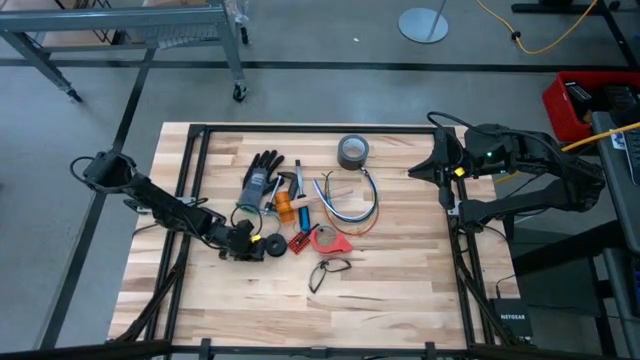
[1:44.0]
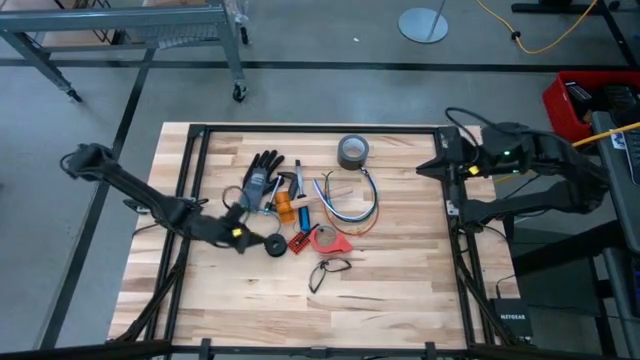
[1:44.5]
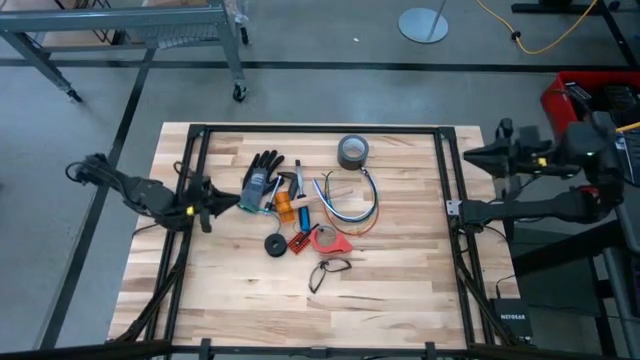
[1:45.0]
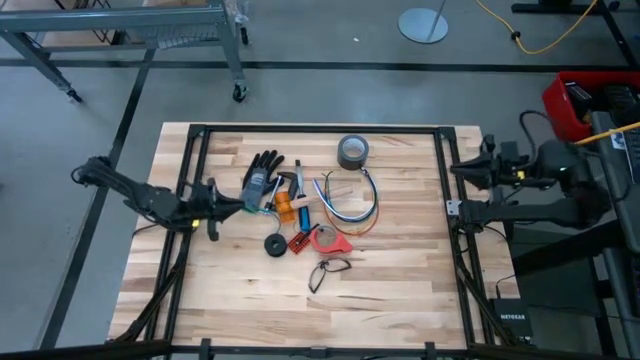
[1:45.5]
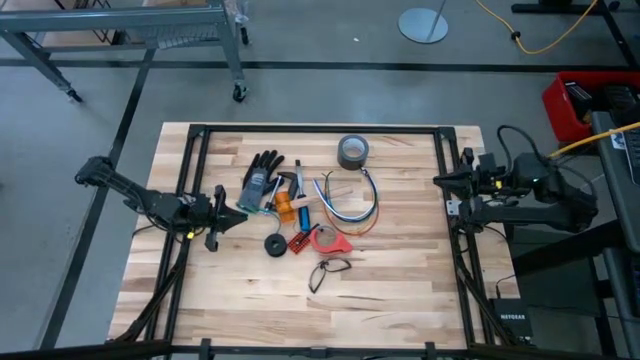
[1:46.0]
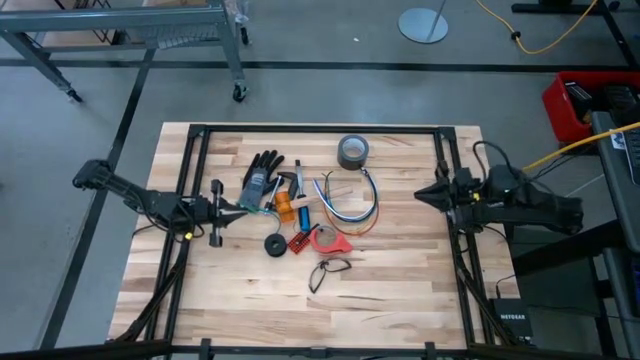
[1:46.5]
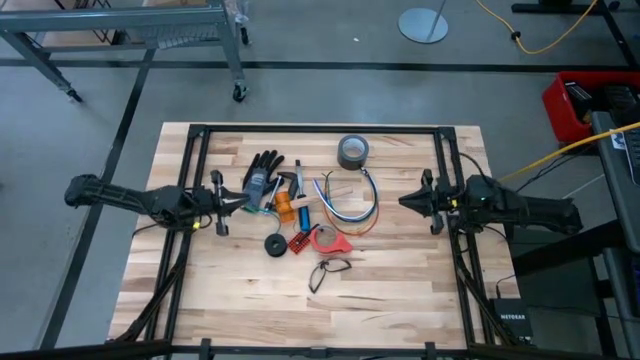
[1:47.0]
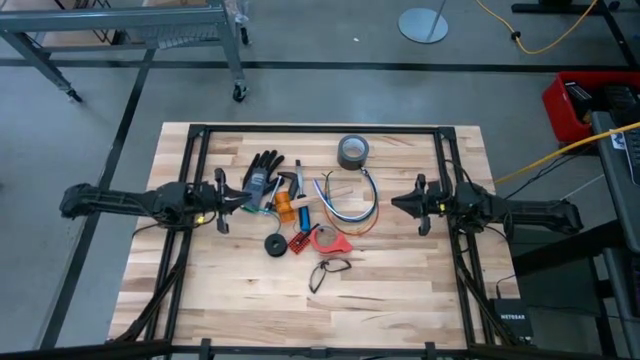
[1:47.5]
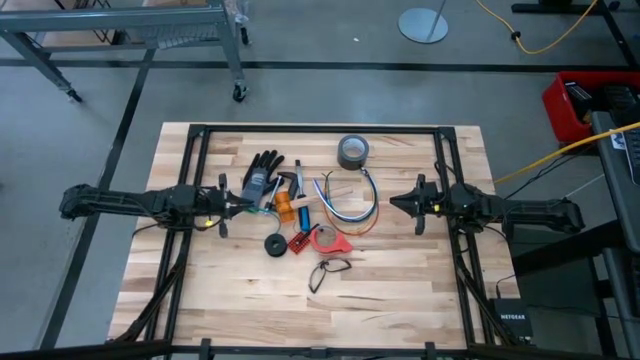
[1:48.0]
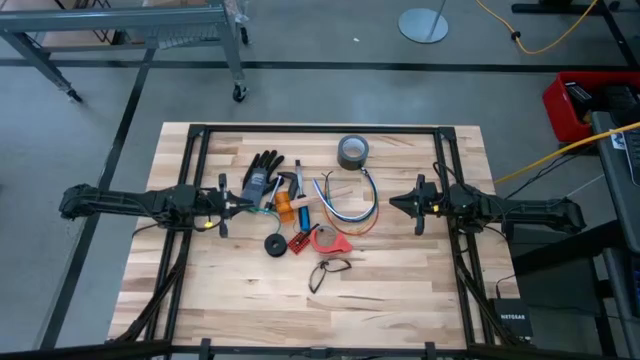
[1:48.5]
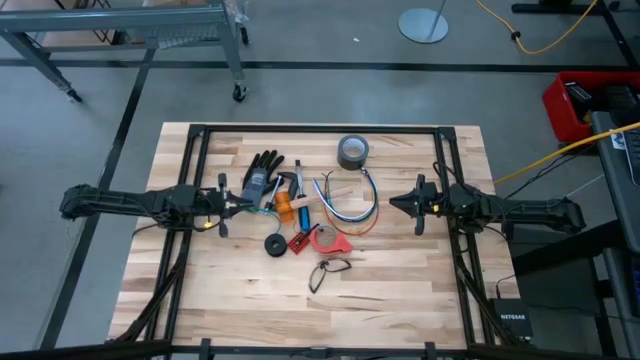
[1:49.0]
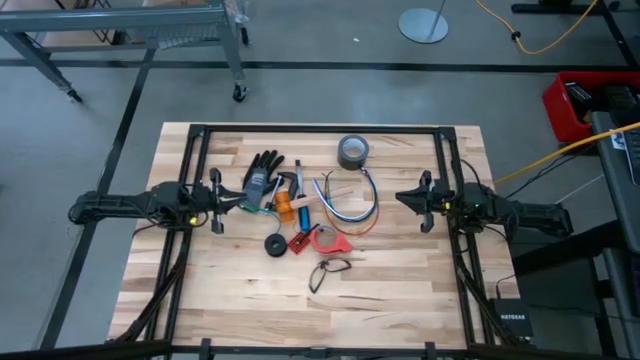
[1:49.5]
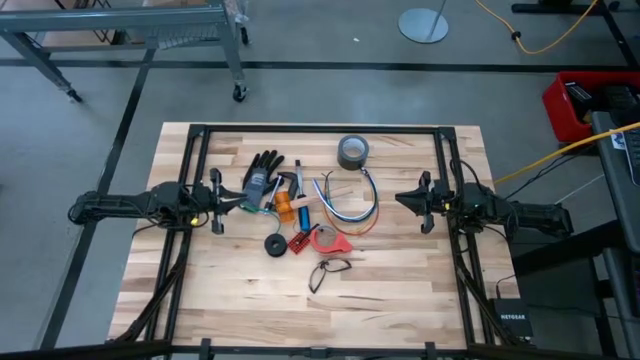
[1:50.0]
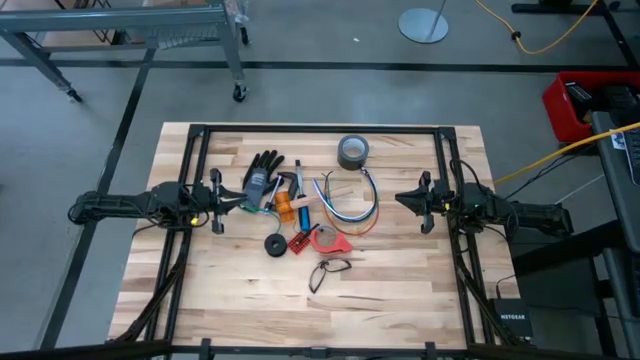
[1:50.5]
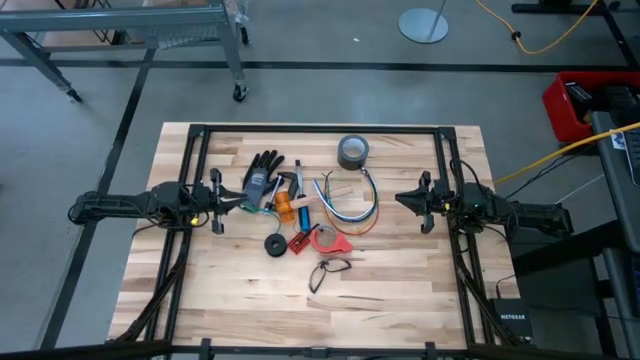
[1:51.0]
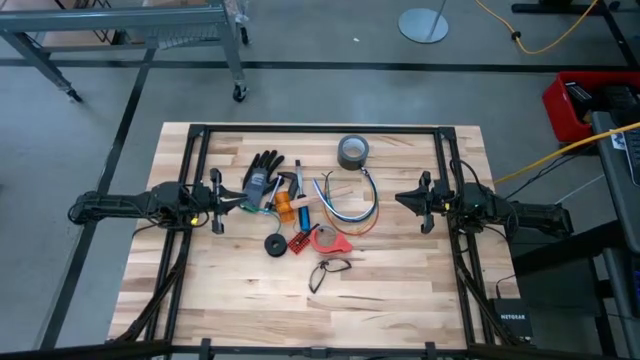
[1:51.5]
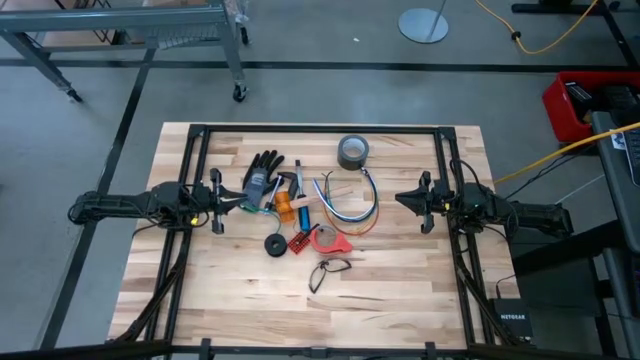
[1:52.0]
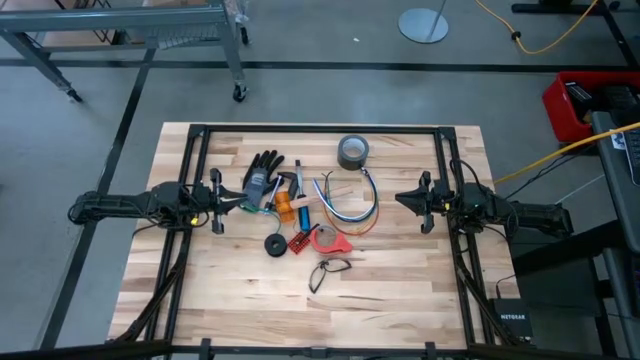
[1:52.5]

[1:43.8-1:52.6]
Task: Coil cords
Return to Home Position

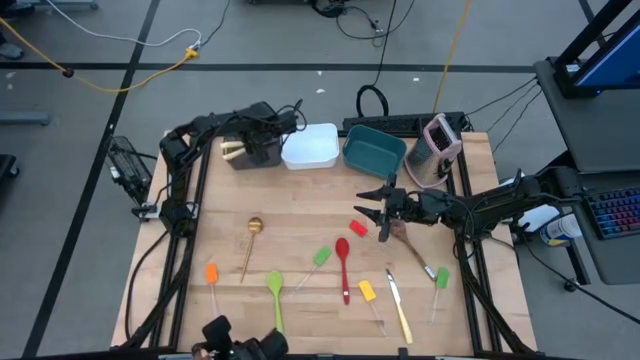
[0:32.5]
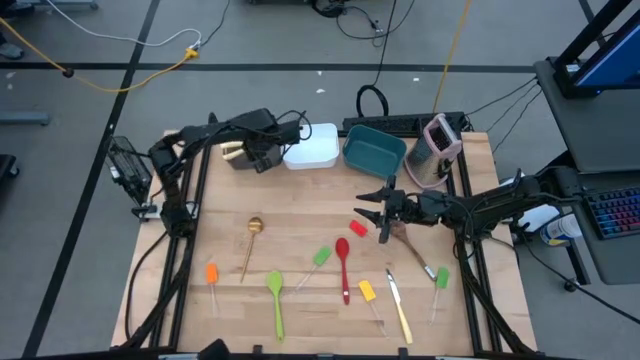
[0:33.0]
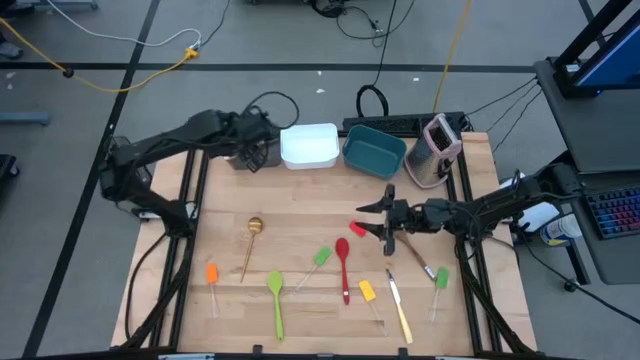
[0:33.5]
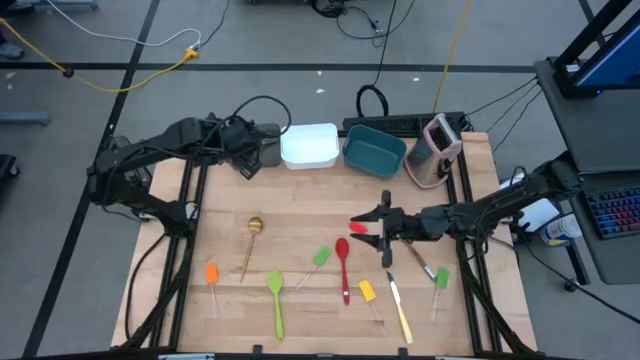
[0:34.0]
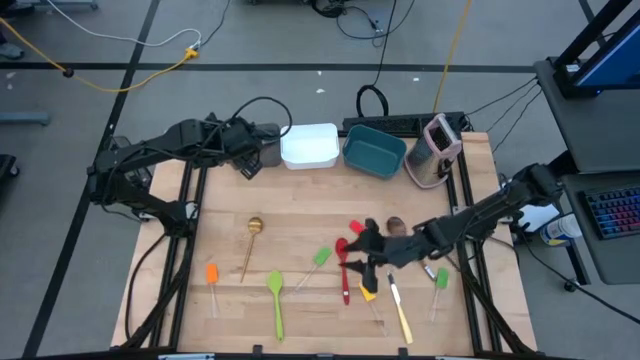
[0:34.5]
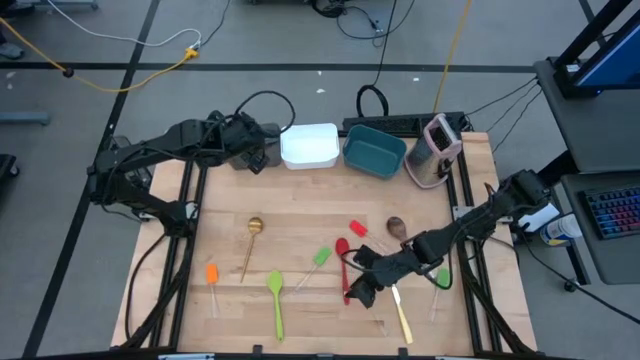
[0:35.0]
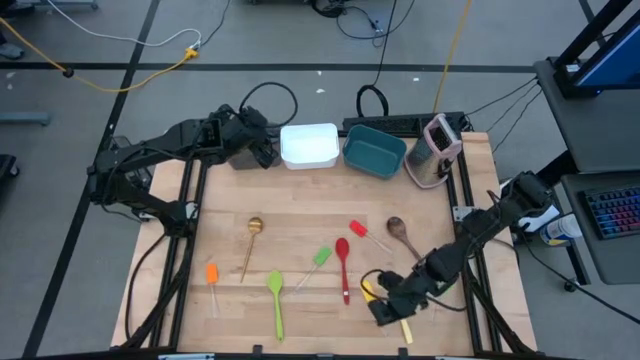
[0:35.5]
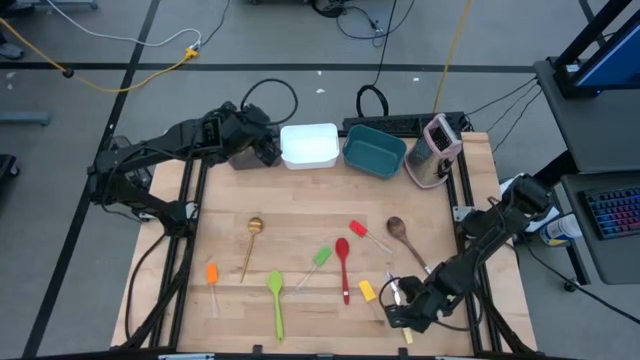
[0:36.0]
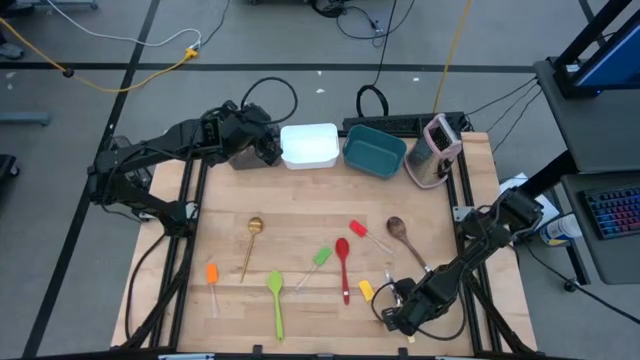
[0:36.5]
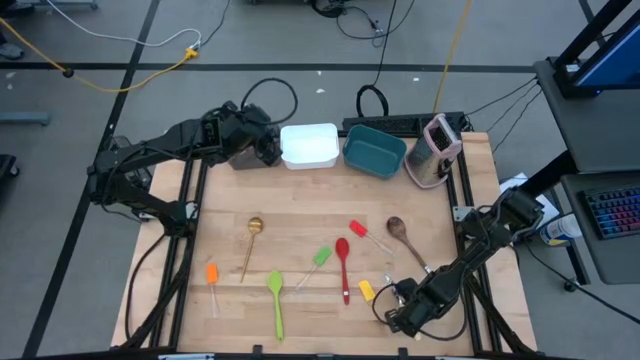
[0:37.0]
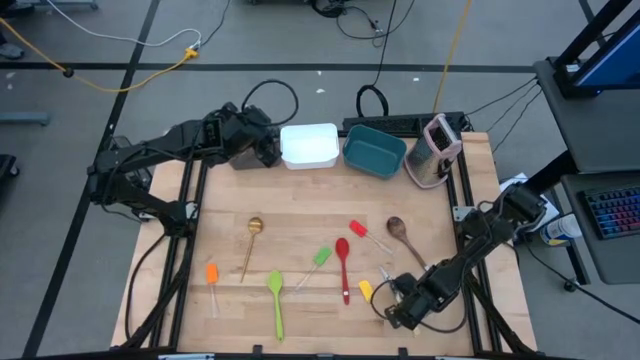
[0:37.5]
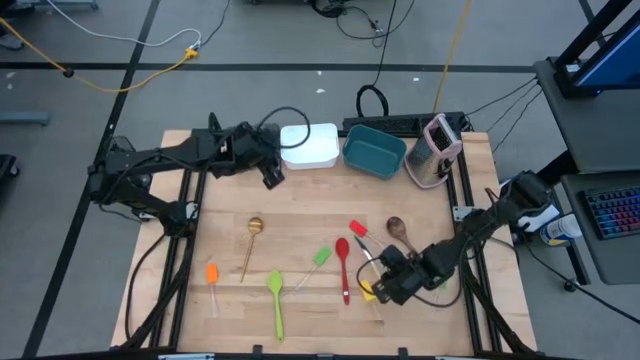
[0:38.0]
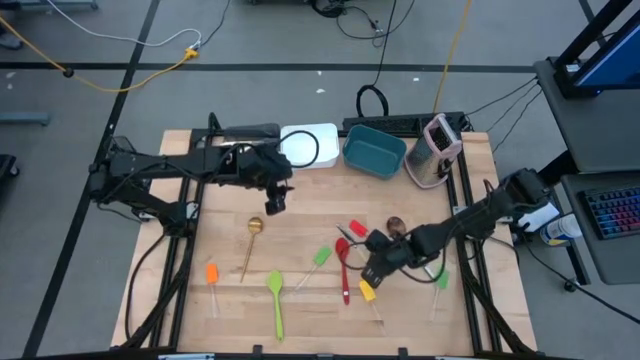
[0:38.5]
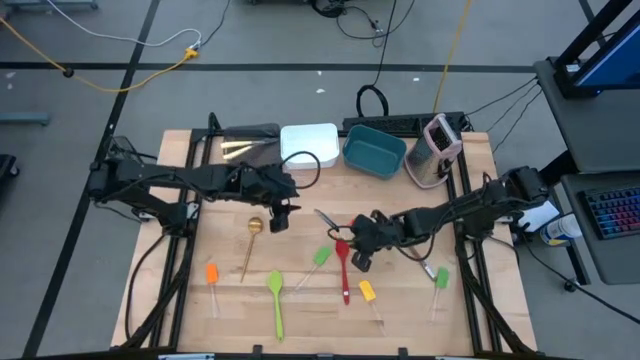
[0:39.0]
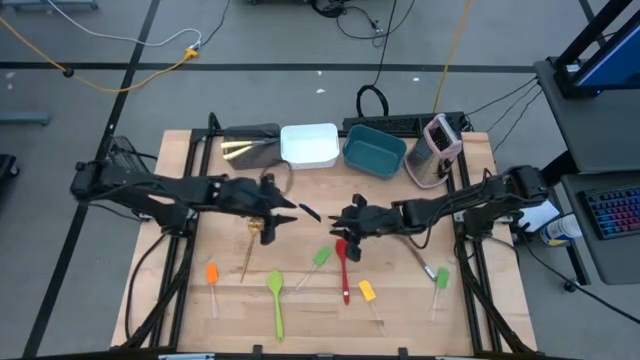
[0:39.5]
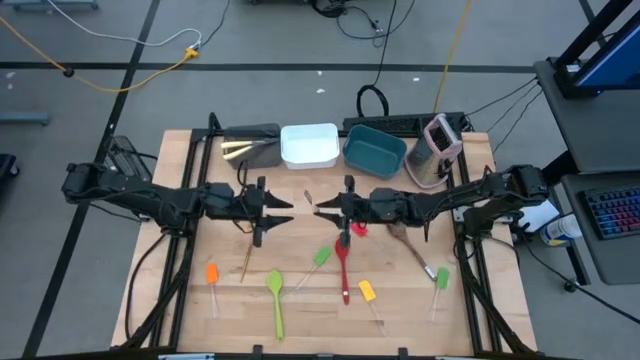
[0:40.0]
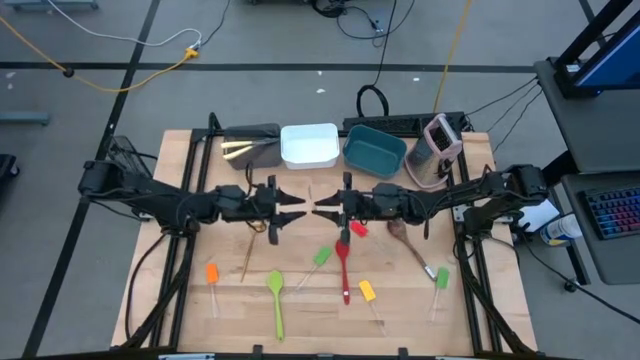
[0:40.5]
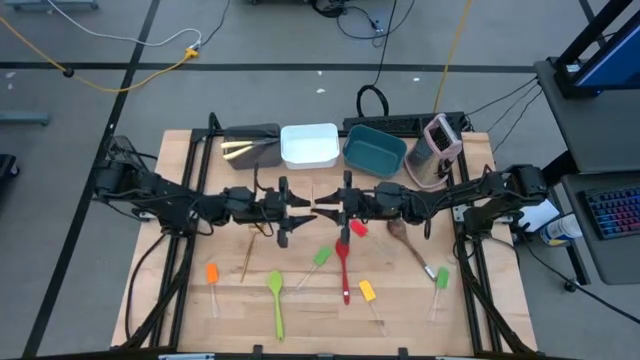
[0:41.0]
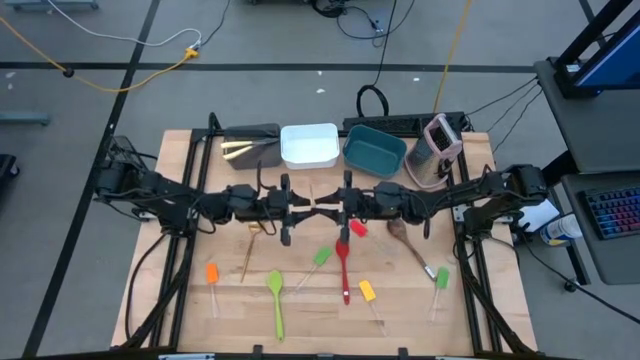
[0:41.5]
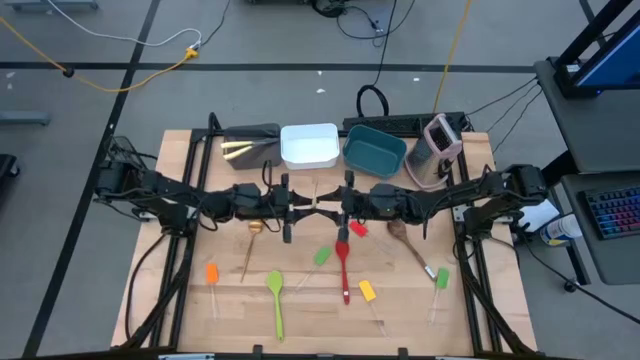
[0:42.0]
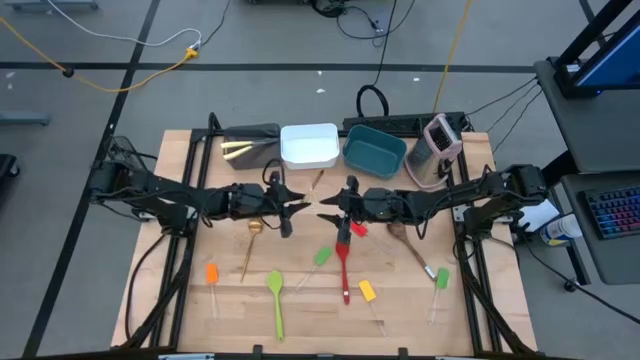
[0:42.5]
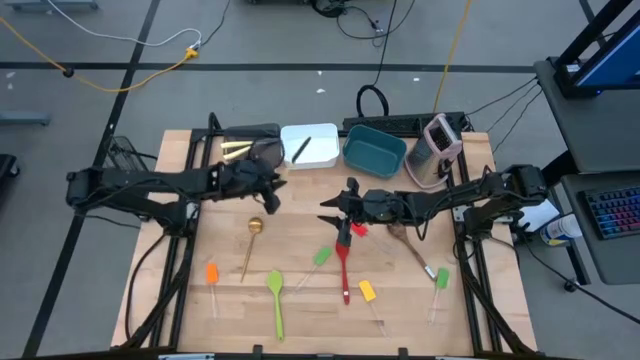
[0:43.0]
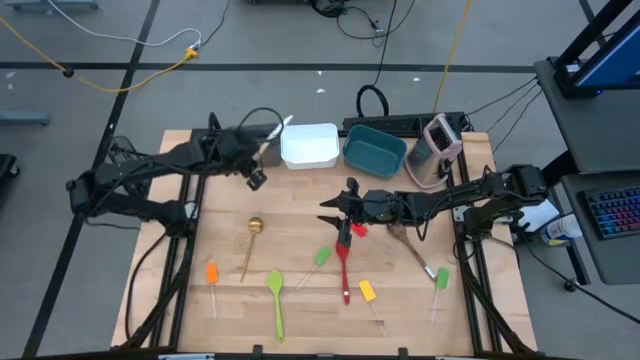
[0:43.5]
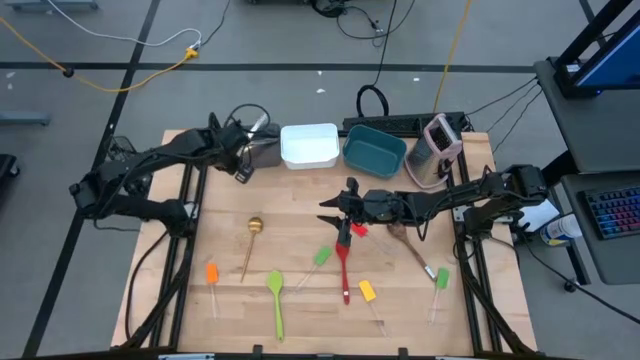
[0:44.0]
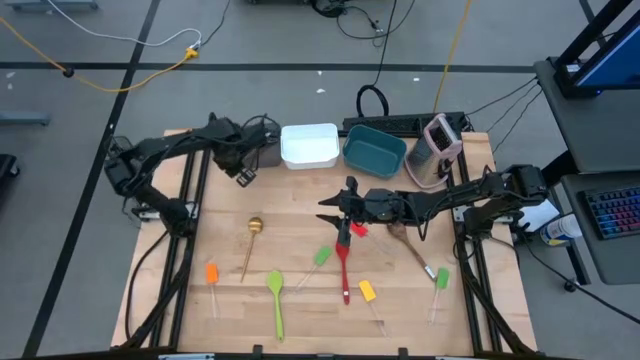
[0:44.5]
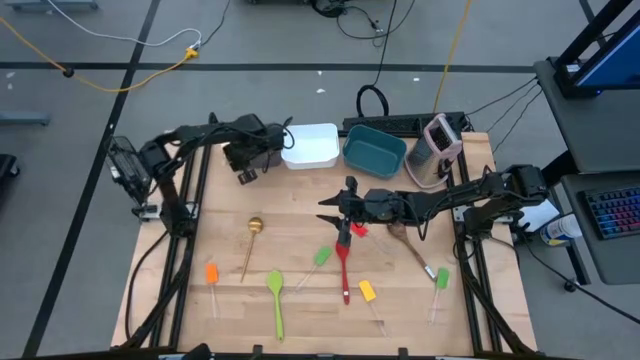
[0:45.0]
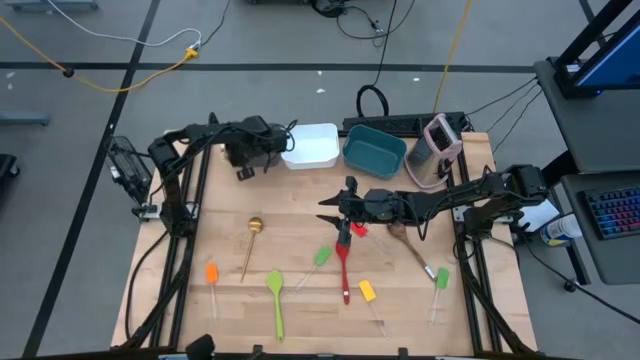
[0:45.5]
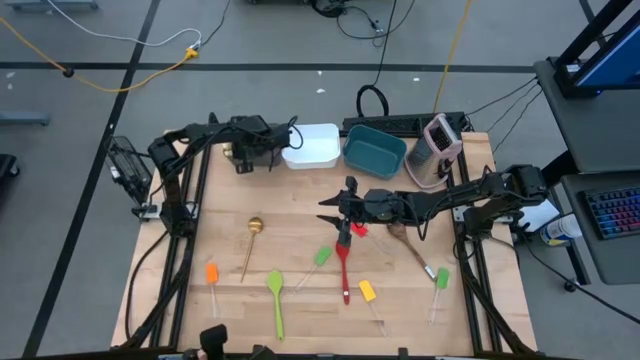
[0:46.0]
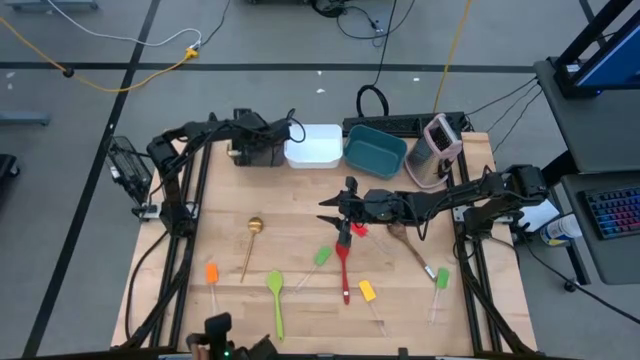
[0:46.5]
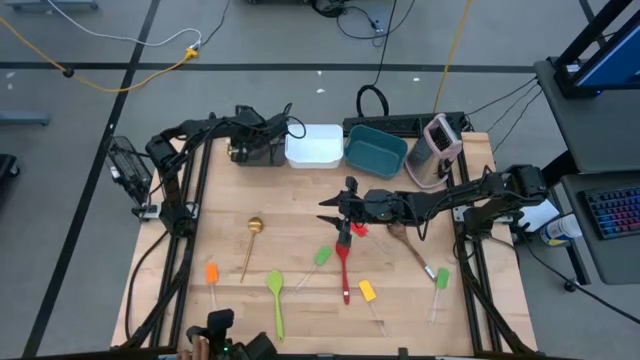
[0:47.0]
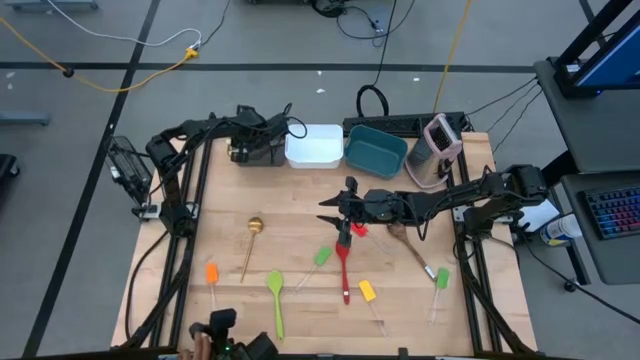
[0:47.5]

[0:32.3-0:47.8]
Task: Pick & Place Kitchen Items
Put the yellow table knife into the black bin
